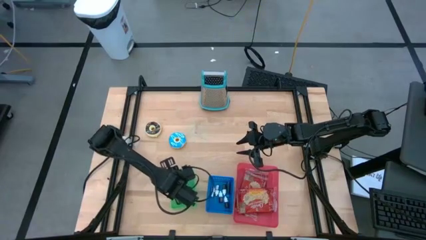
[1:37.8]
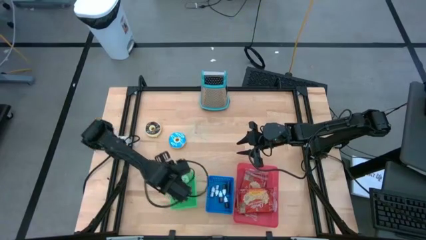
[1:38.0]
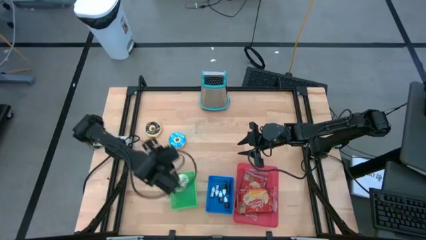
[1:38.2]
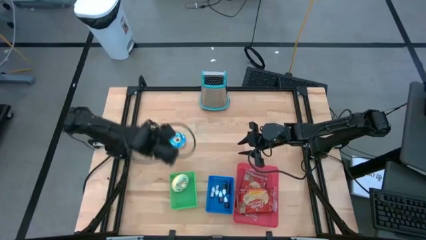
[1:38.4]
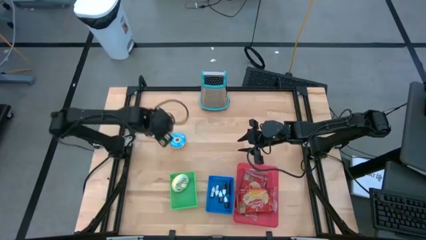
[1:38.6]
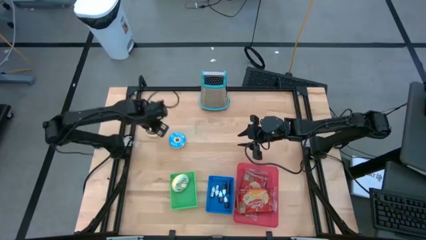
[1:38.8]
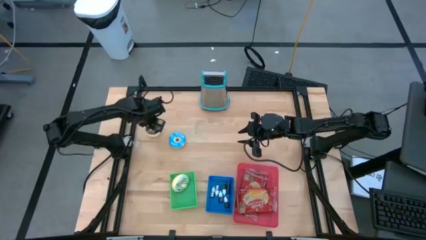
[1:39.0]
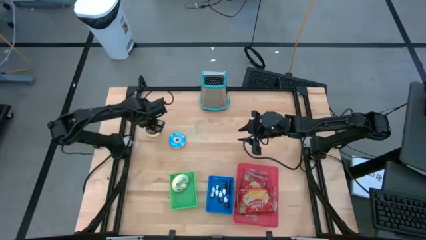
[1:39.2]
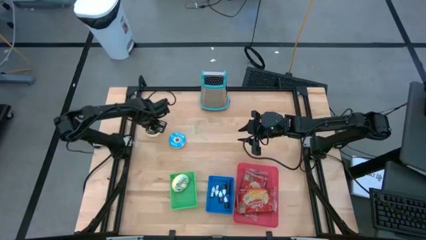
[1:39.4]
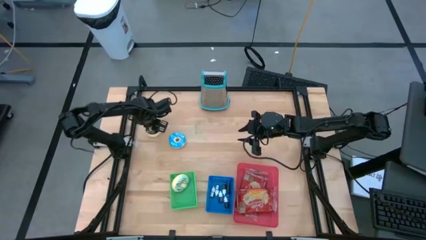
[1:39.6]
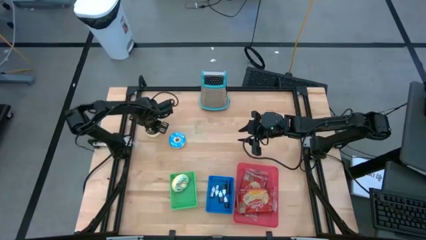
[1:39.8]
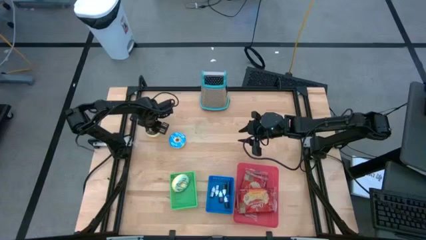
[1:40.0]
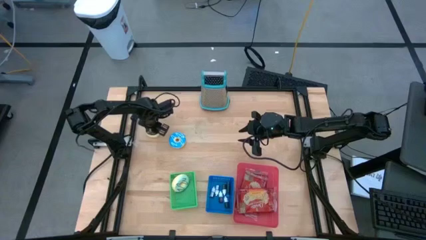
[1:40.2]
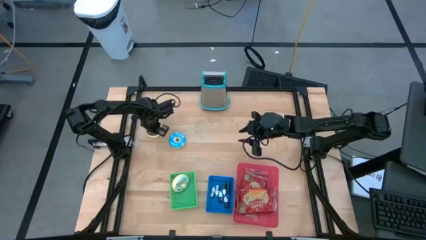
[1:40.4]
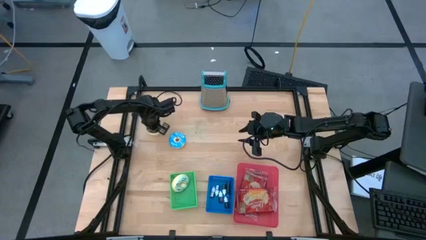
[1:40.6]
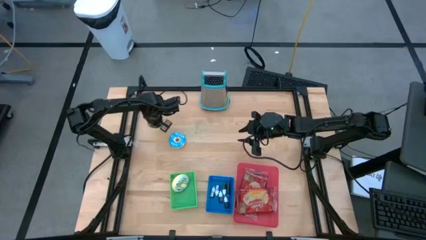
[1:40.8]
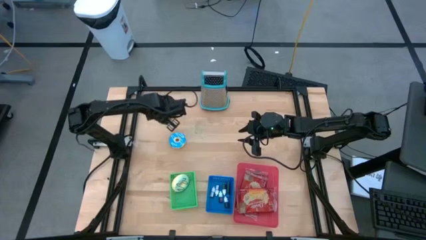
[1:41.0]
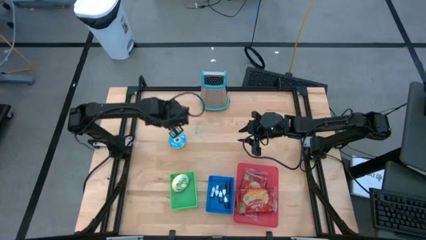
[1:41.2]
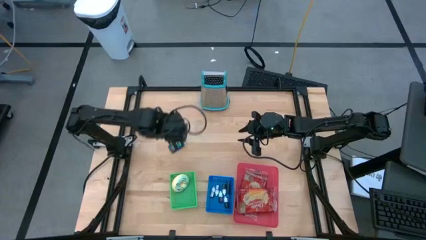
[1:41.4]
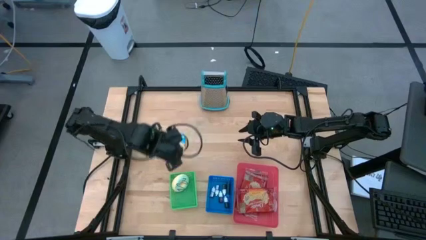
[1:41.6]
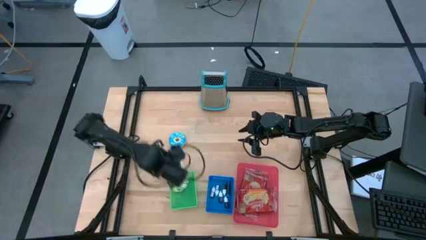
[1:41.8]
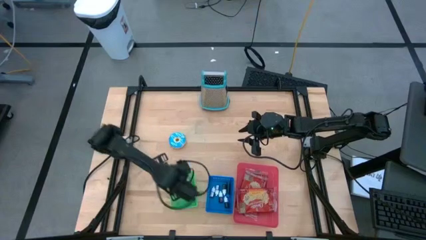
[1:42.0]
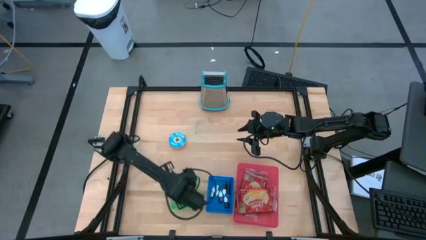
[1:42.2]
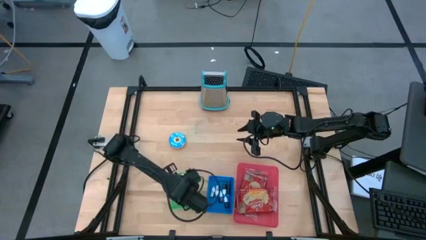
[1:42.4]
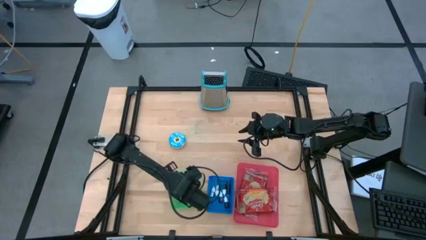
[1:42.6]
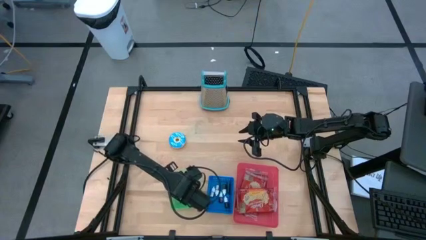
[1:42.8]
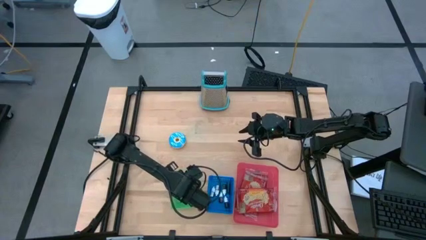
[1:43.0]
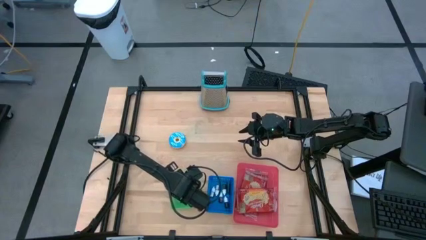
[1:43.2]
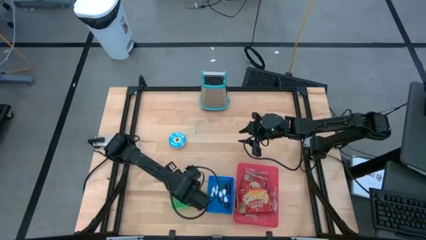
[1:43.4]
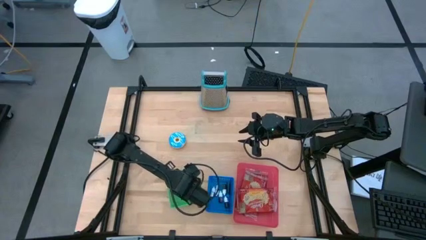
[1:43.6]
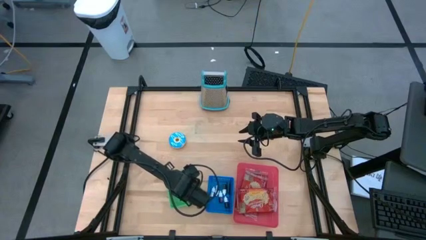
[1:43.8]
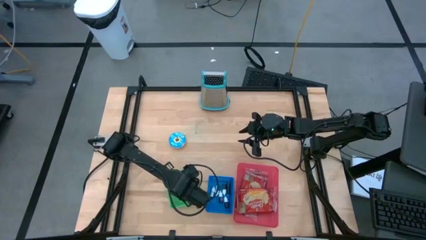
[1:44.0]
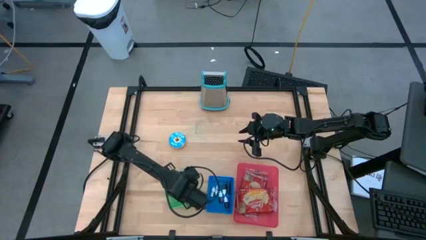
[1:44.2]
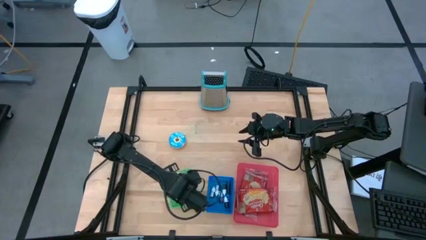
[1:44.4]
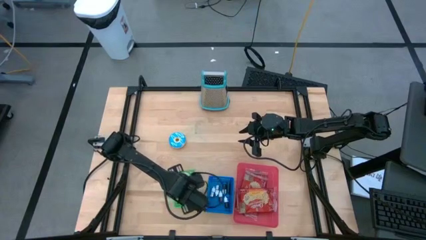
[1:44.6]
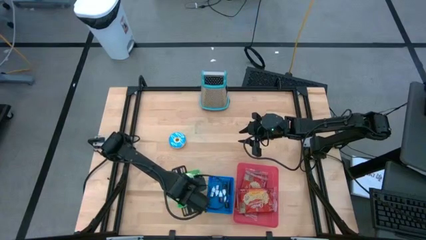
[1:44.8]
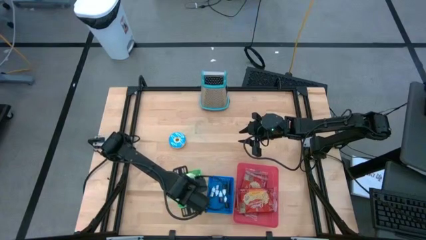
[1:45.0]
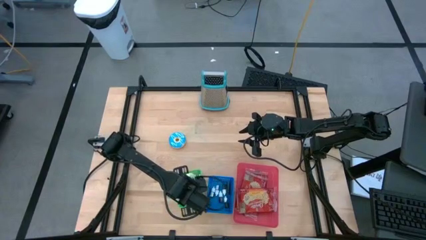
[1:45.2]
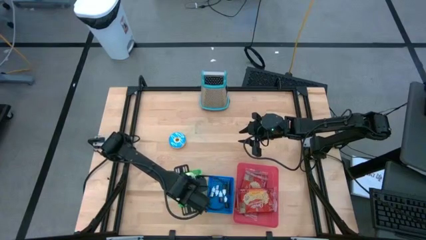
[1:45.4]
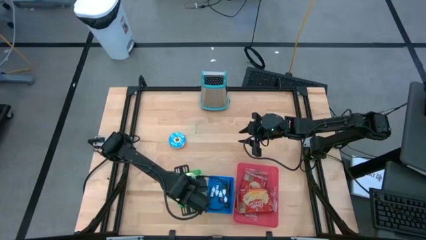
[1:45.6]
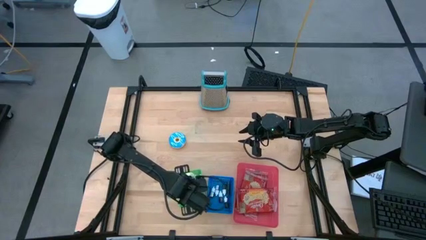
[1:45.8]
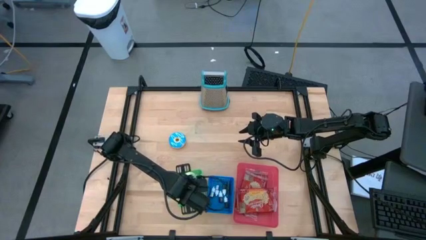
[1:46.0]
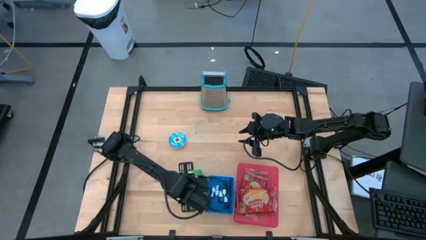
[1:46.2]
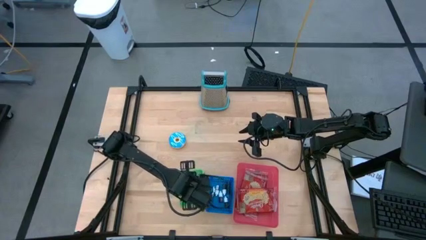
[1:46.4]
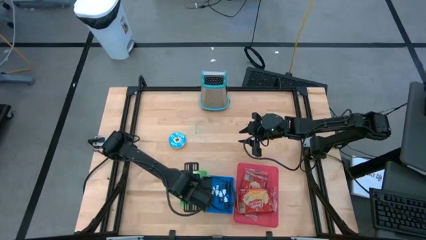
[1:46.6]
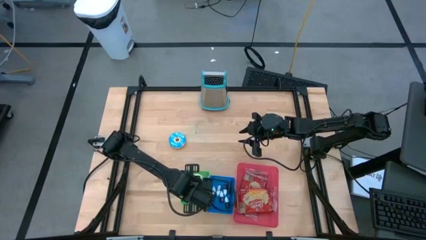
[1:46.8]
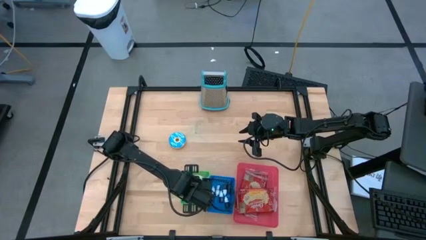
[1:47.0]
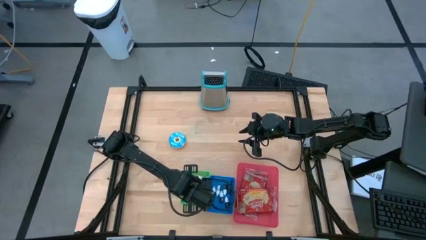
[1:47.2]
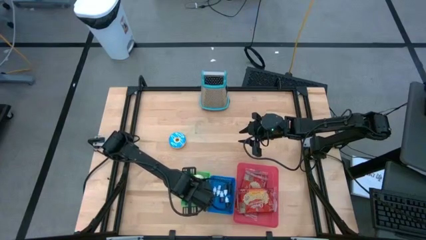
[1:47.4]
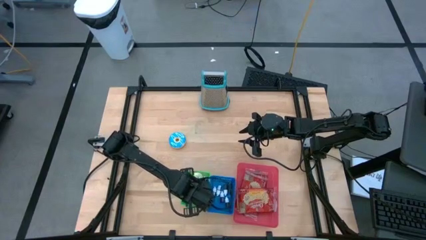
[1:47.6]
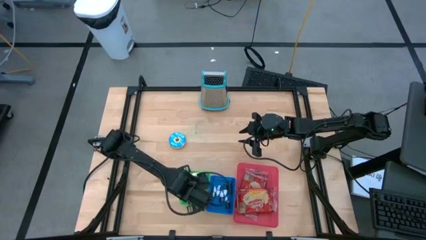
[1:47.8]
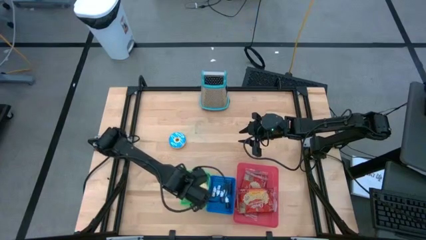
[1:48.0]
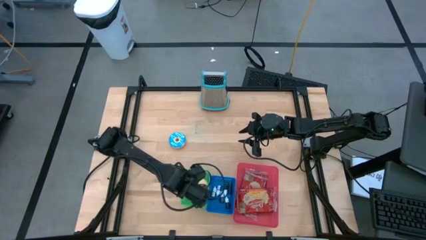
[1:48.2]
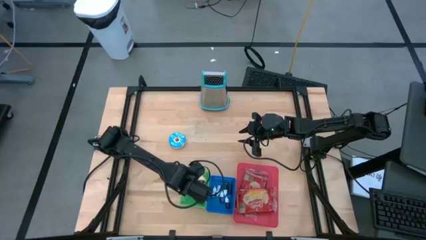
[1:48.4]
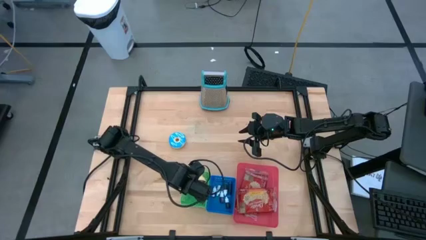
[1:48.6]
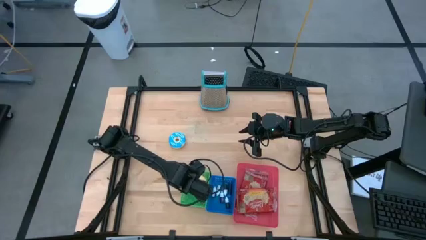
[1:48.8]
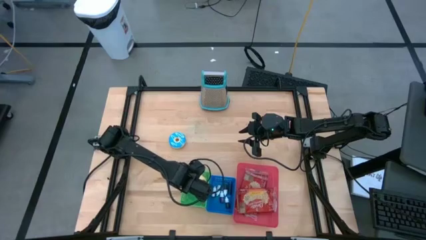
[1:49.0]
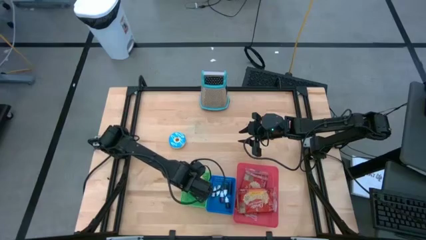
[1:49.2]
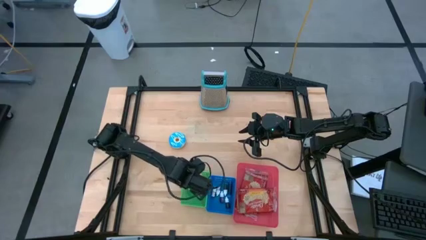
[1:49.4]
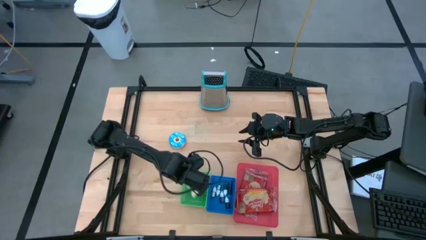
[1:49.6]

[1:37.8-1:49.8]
Put the black doughnut into the green bin

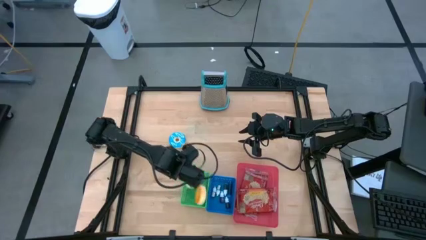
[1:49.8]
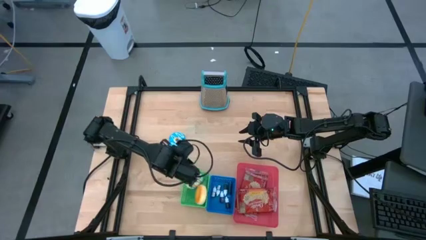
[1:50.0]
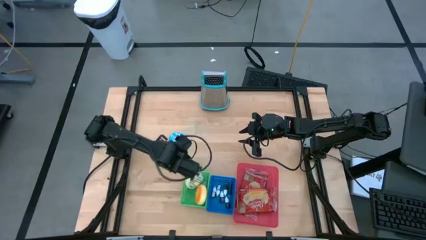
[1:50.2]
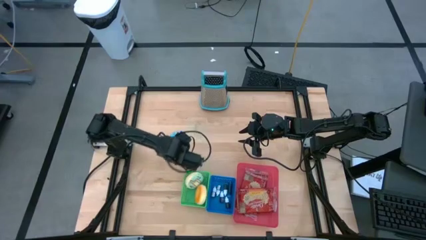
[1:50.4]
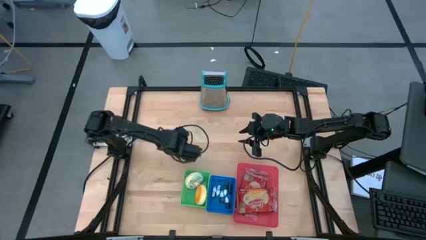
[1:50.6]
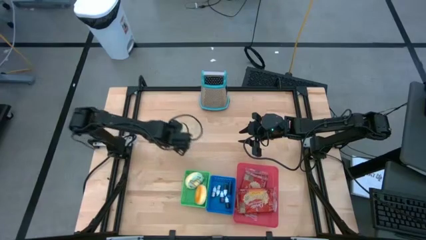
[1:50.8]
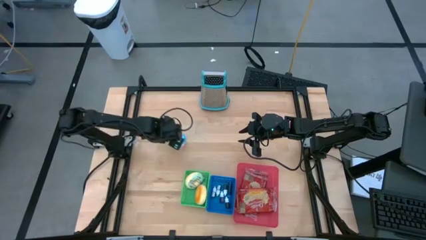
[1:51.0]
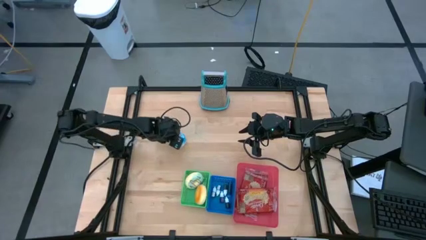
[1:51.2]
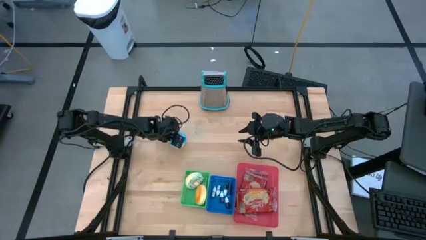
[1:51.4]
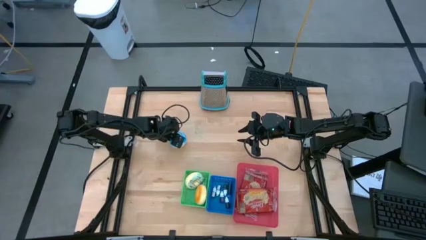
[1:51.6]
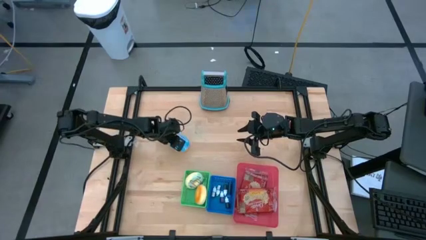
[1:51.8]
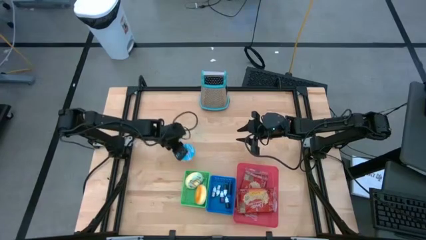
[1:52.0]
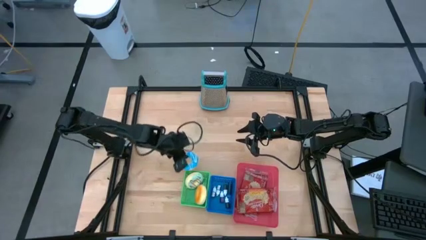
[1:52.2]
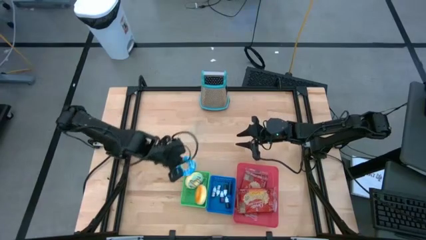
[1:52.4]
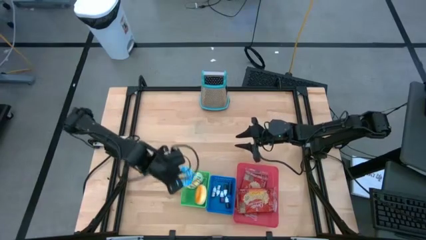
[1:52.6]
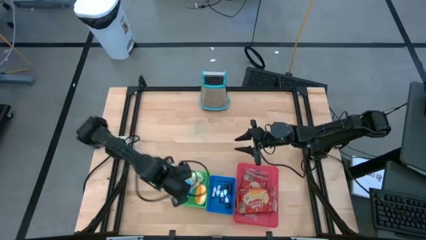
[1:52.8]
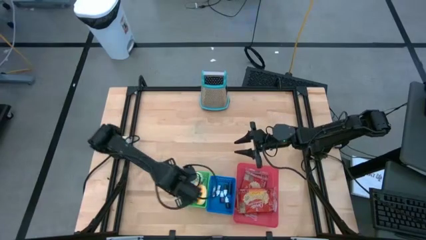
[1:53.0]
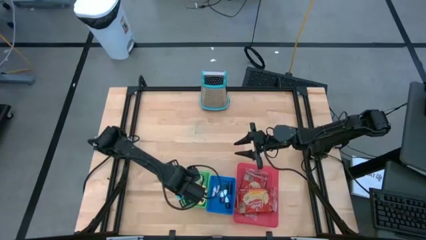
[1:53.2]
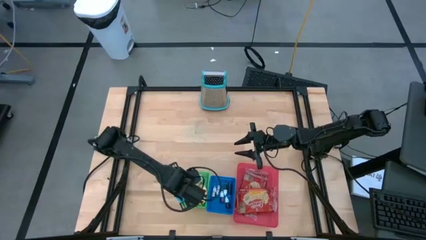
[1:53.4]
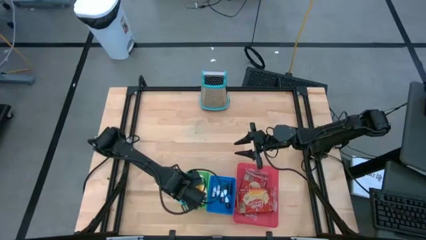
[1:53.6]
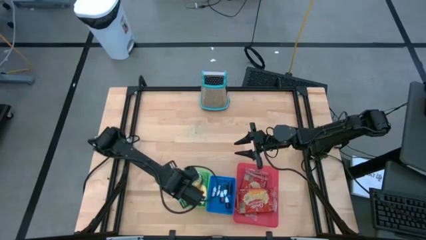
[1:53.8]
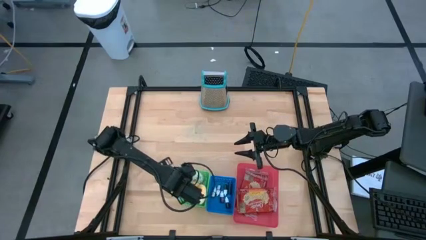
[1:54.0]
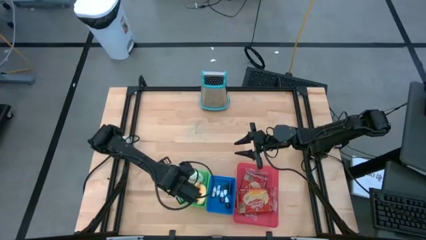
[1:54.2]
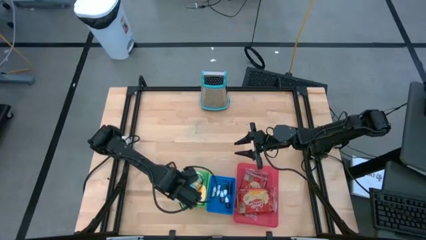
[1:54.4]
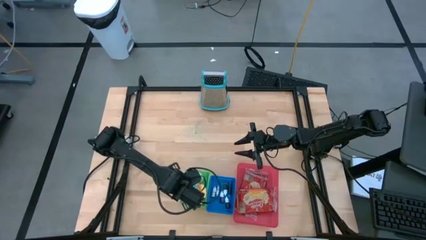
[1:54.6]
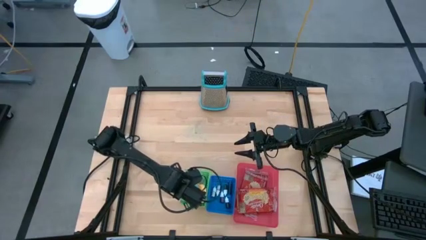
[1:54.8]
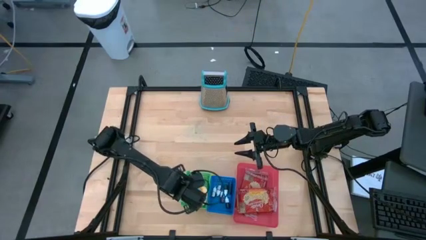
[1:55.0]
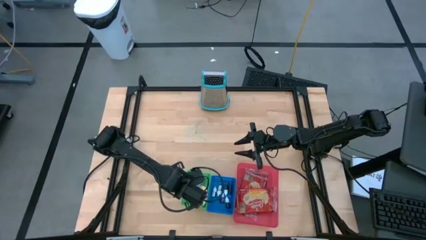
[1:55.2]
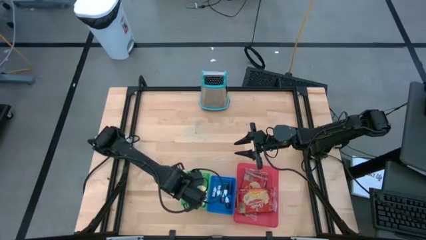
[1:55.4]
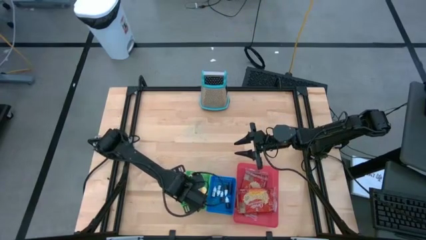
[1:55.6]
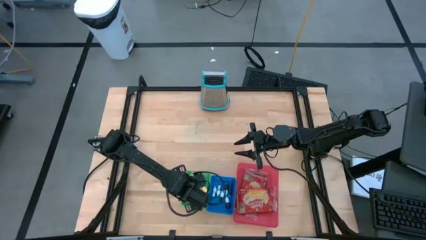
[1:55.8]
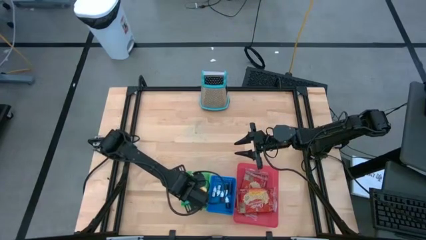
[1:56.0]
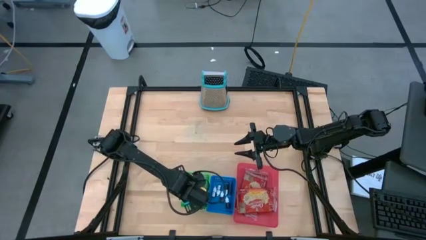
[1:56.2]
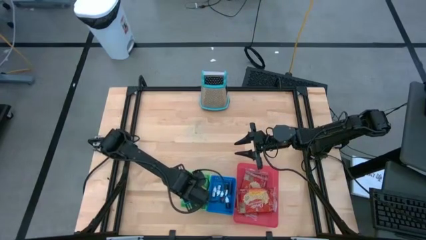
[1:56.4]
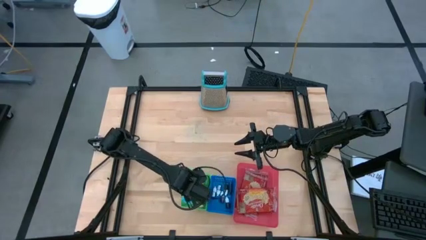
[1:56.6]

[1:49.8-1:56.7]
Put the blue doughnut into the green bin
